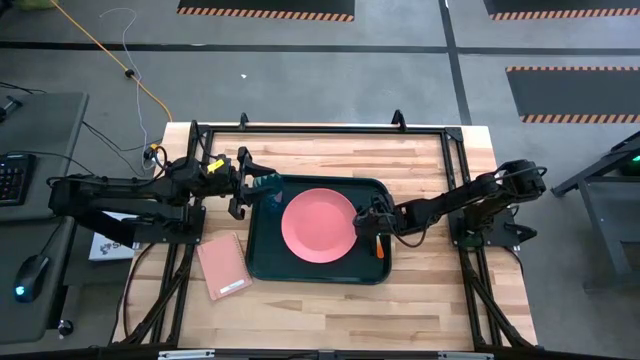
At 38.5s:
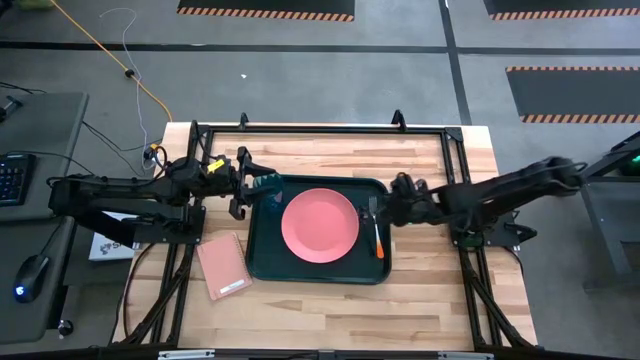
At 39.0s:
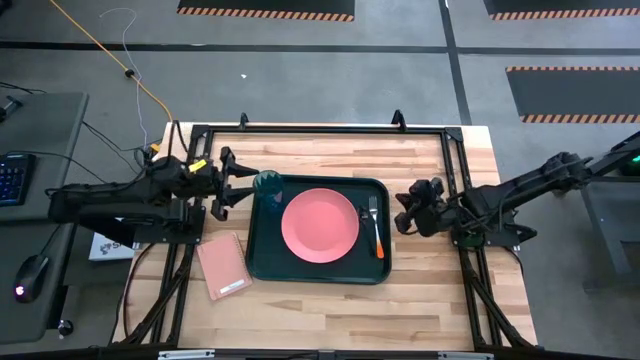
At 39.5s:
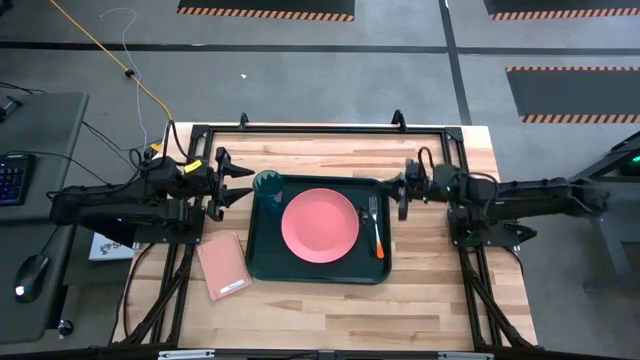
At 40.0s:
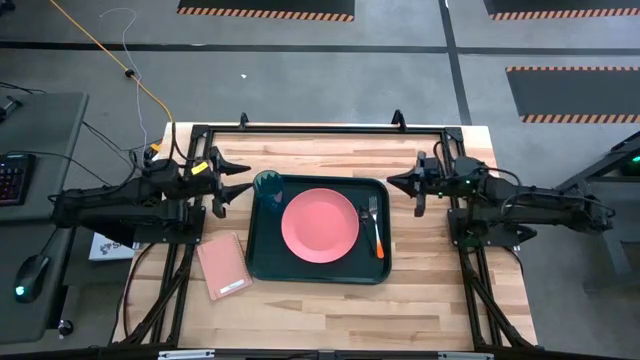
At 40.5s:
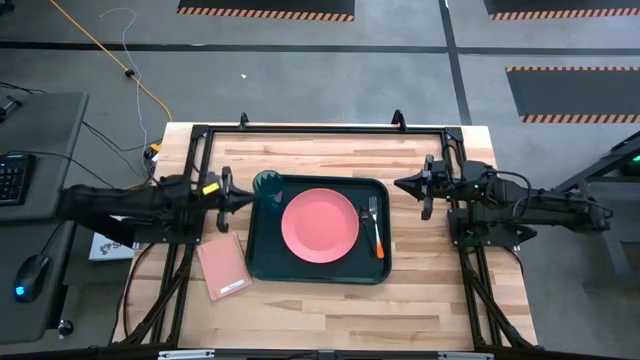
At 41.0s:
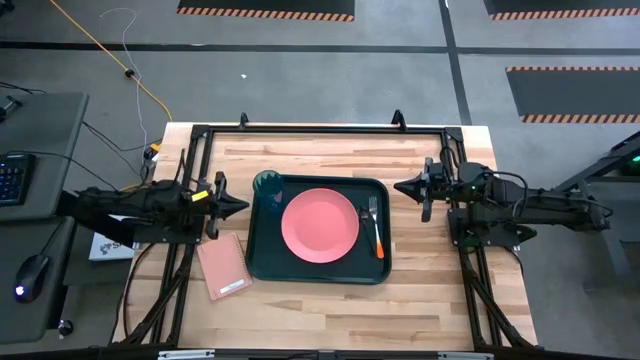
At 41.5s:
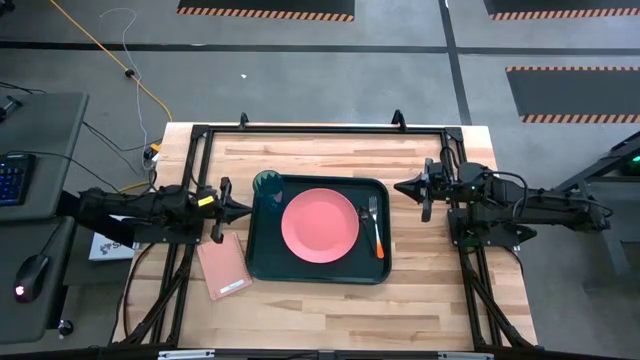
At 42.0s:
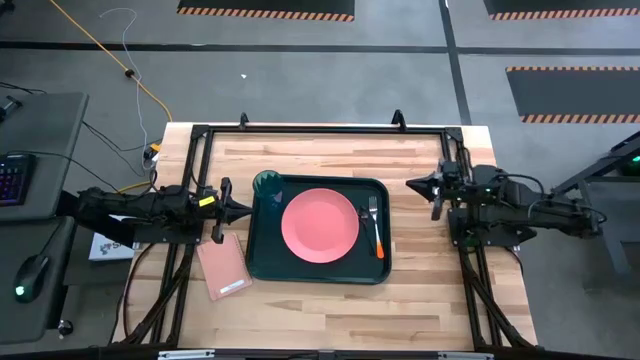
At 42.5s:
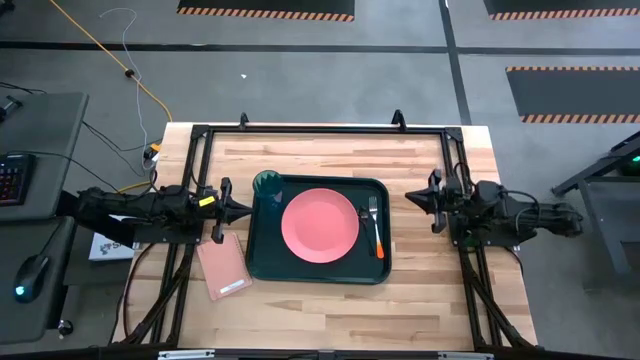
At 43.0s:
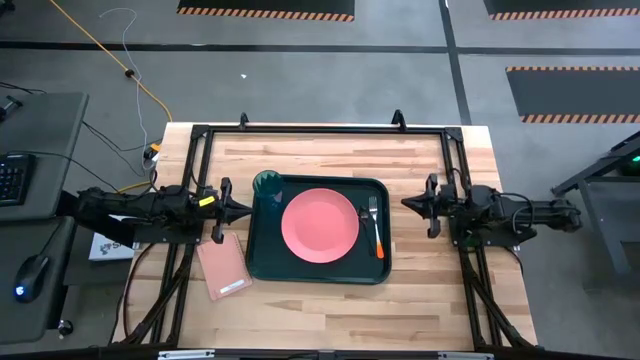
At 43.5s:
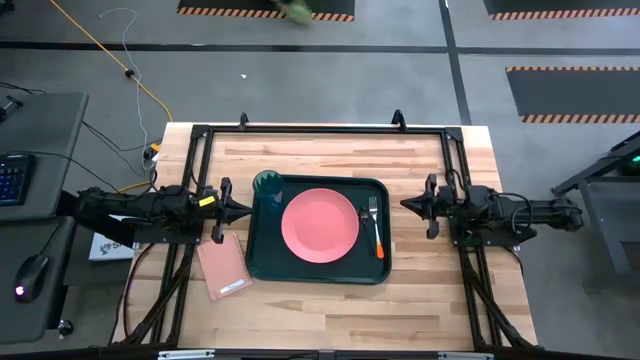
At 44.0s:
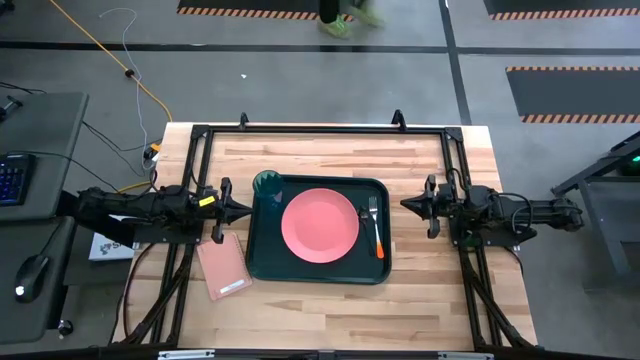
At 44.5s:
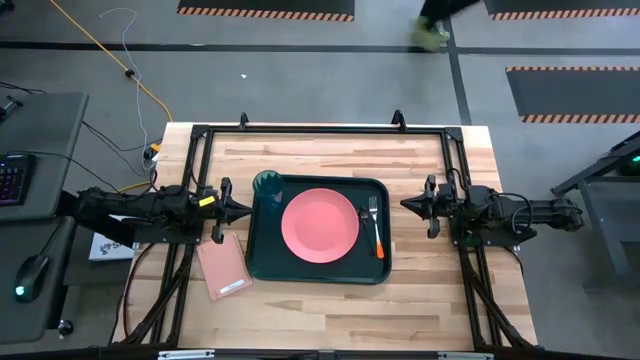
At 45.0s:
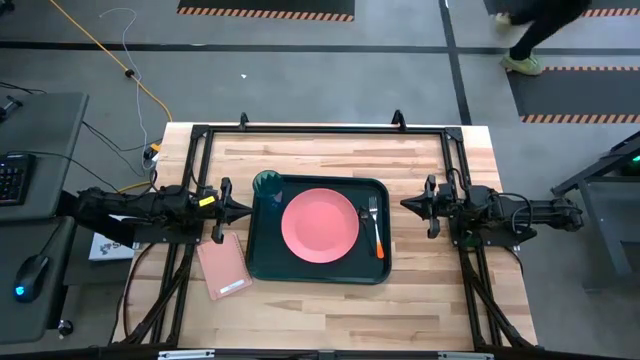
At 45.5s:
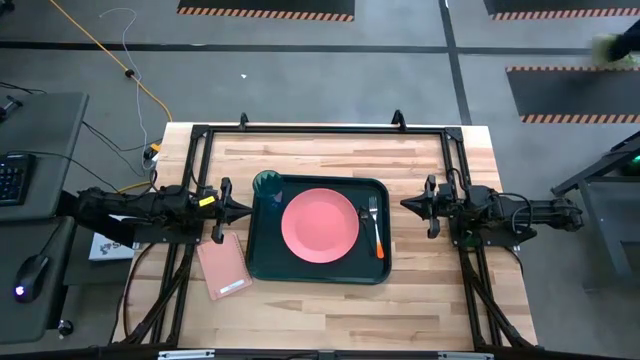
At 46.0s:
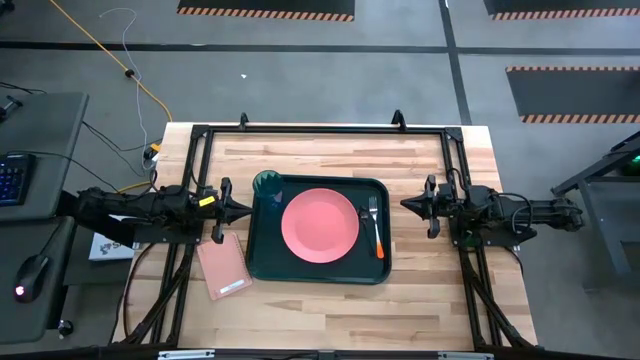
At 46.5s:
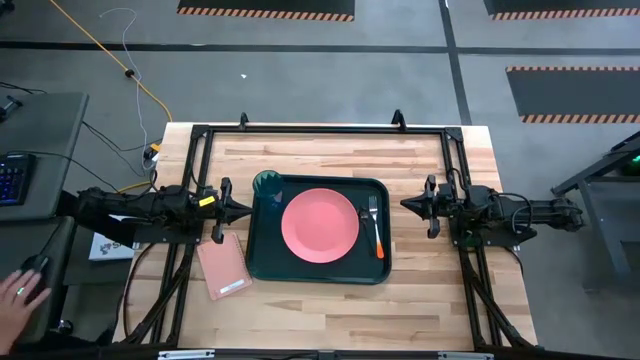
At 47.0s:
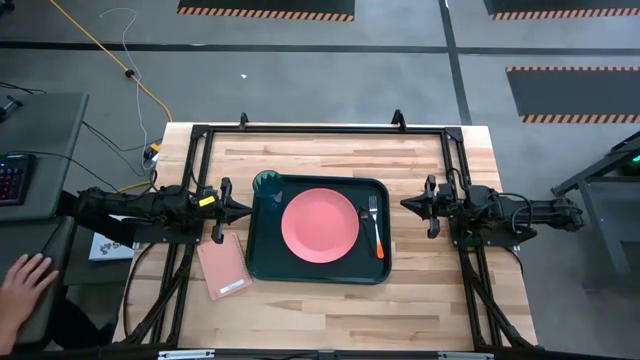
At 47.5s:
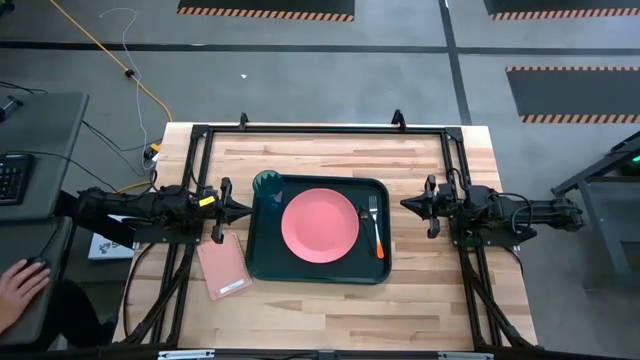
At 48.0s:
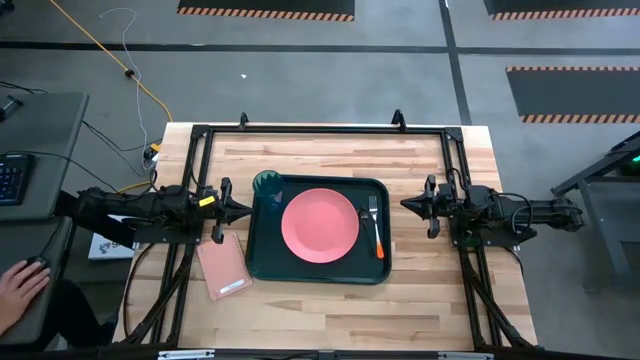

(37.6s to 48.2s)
Task: Pick and place plate/cup/fork/spoon on tray
Return to Home Position

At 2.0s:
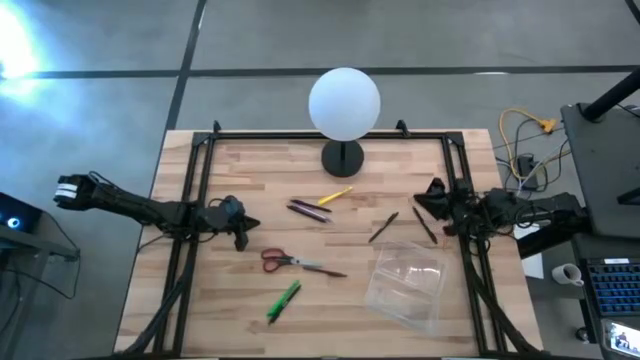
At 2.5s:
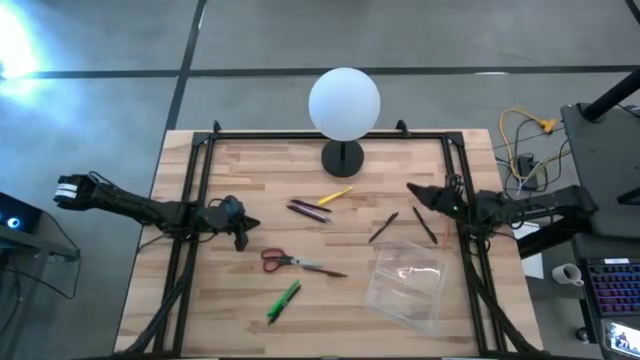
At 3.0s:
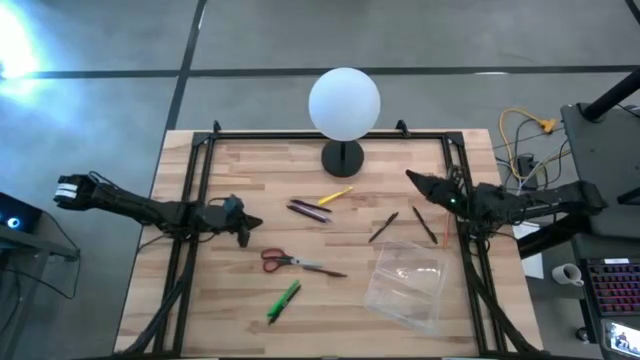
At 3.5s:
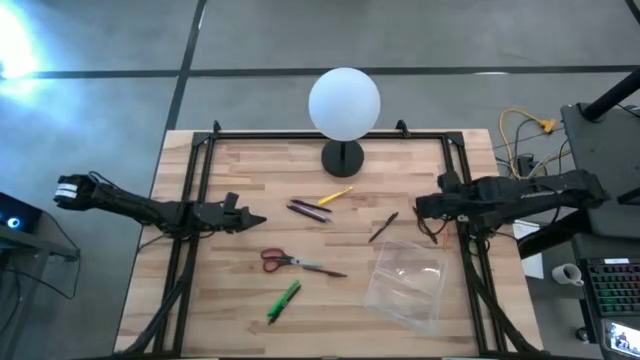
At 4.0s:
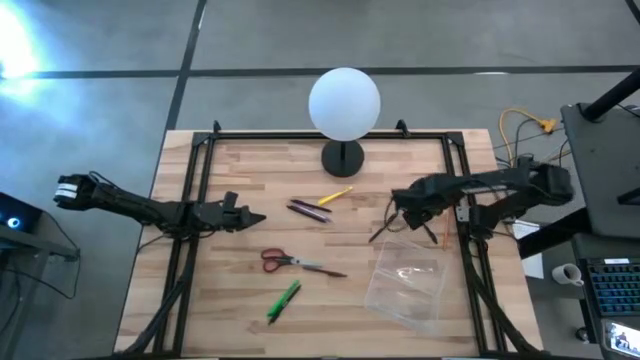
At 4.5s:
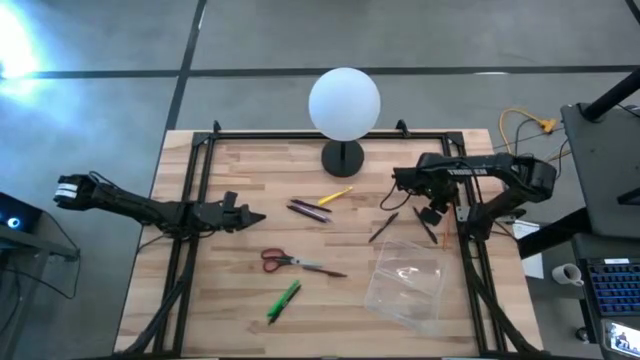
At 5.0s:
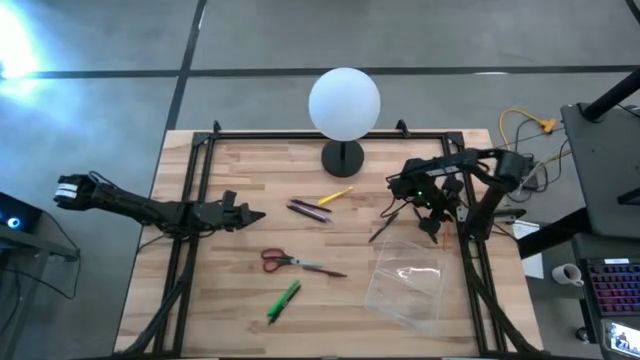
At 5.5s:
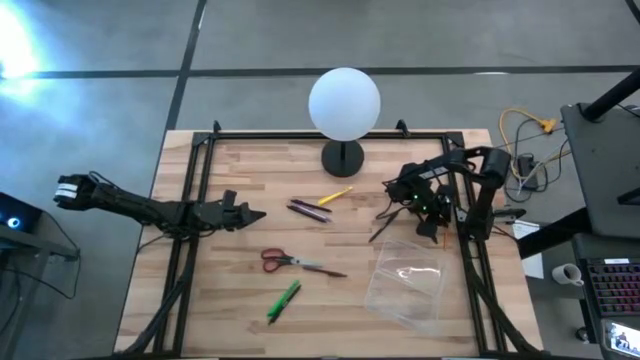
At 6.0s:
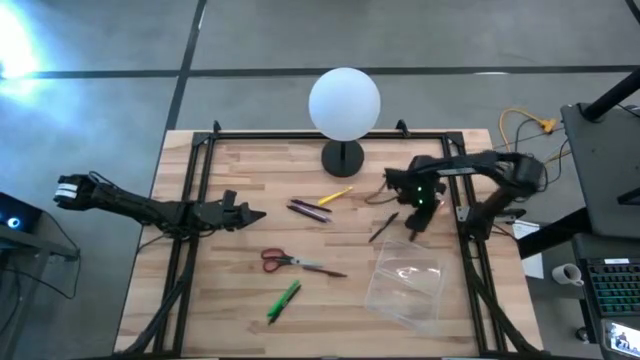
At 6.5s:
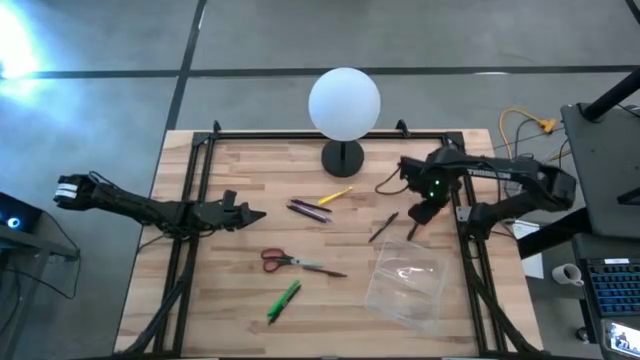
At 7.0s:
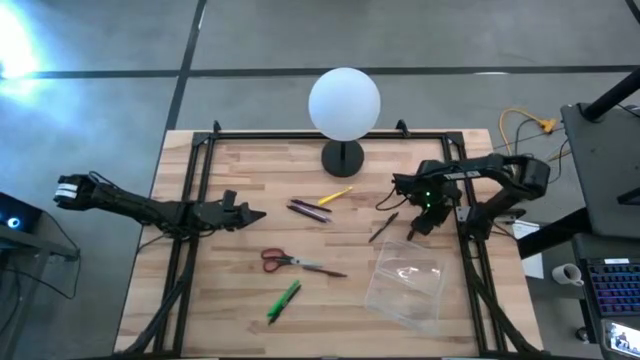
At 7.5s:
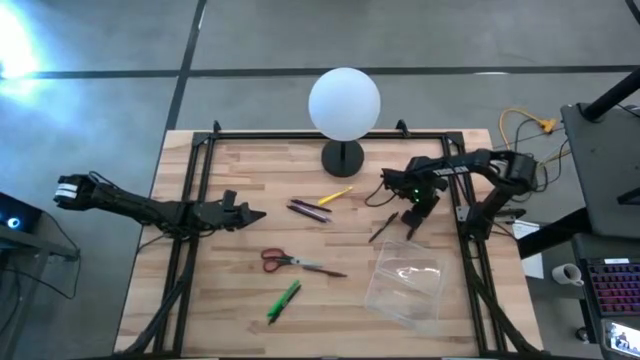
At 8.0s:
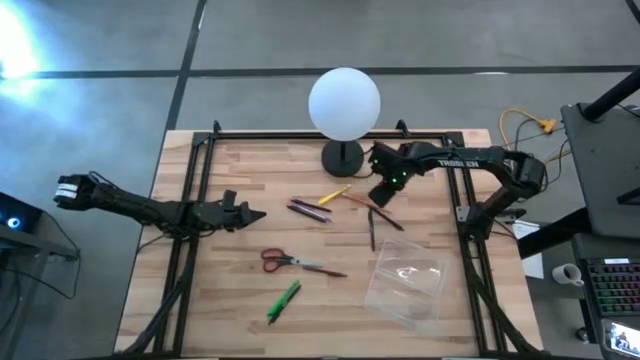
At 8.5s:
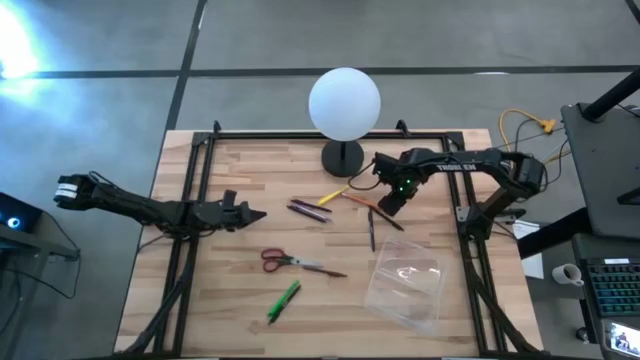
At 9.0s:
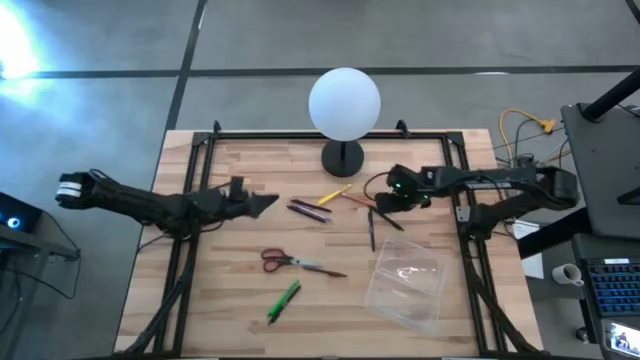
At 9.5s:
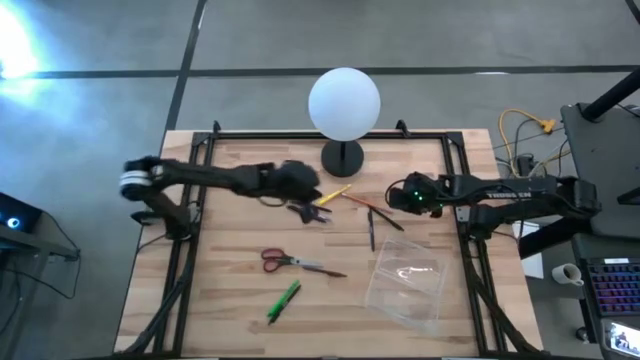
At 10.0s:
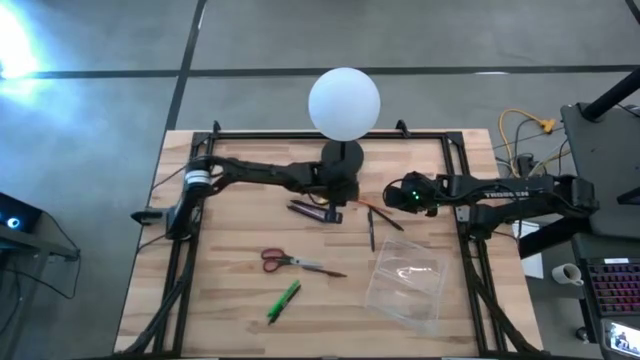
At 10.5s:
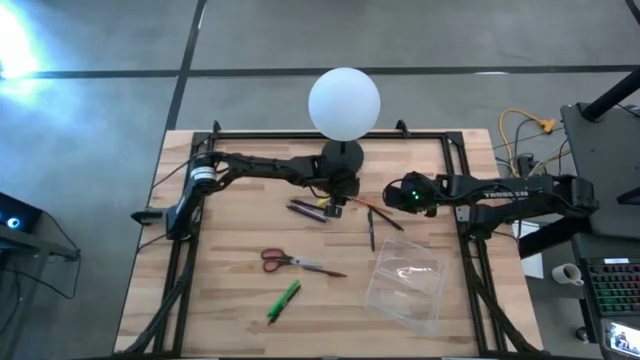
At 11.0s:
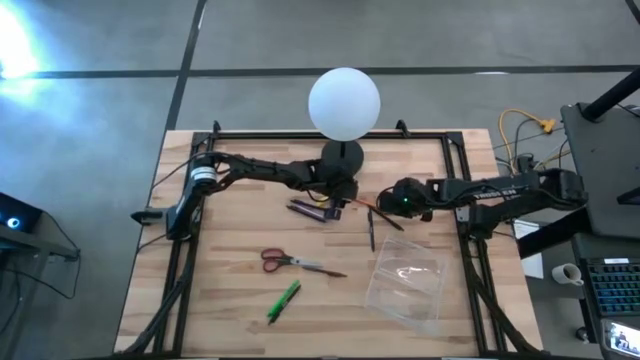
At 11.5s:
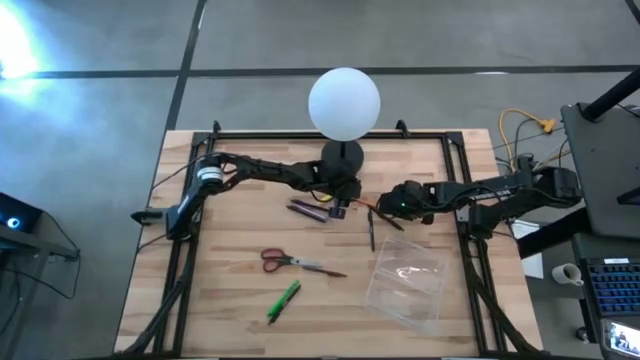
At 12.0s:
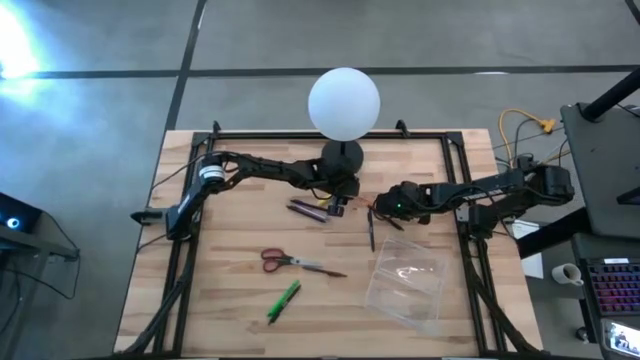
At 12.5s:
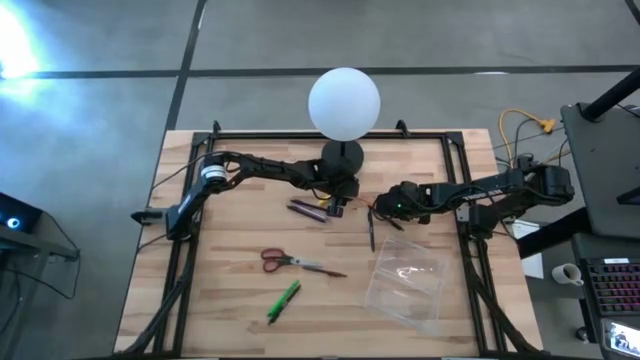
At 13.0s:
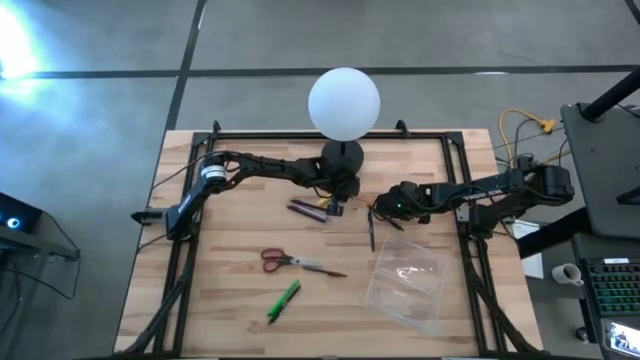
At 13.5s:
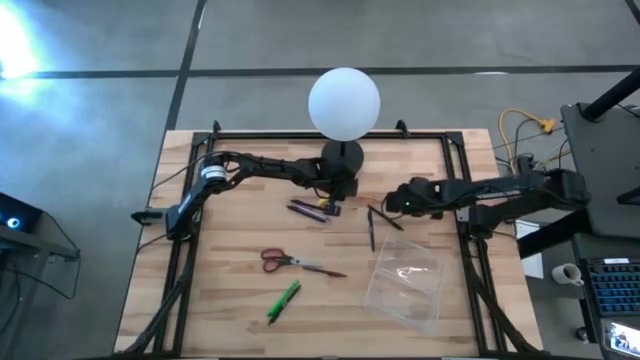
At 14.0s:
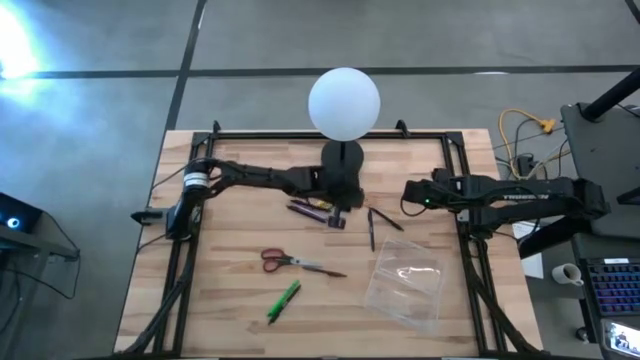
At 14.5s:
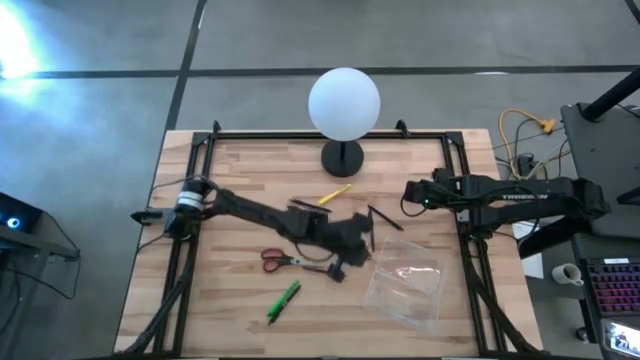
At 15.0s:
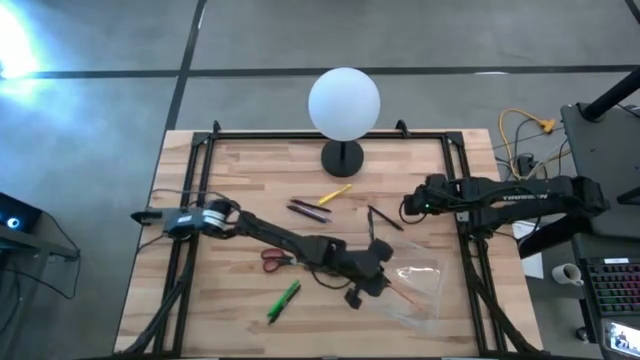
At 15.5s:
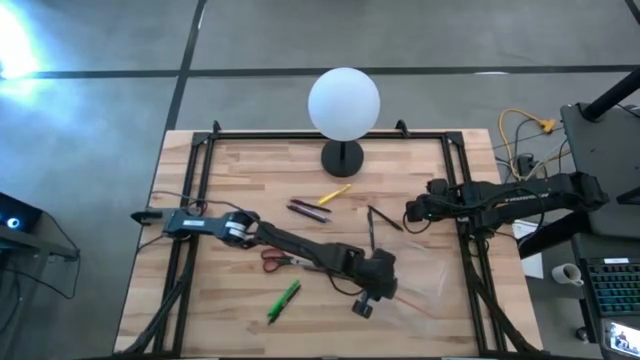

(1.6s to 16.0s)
Task: Pick & place school supplies into a supply box
Put the orange pencil into the supply box
